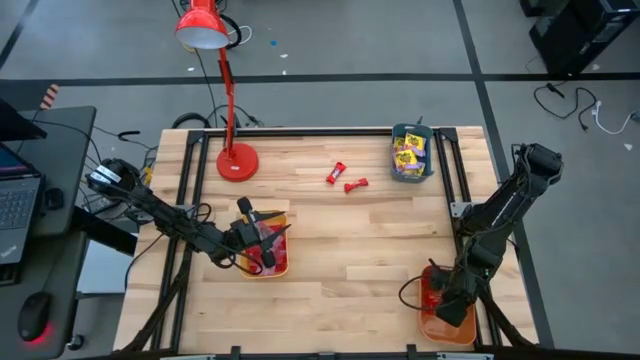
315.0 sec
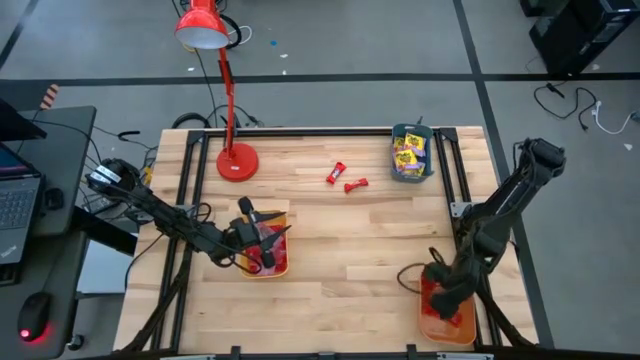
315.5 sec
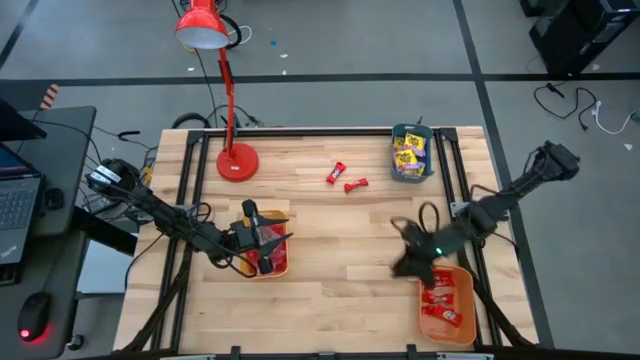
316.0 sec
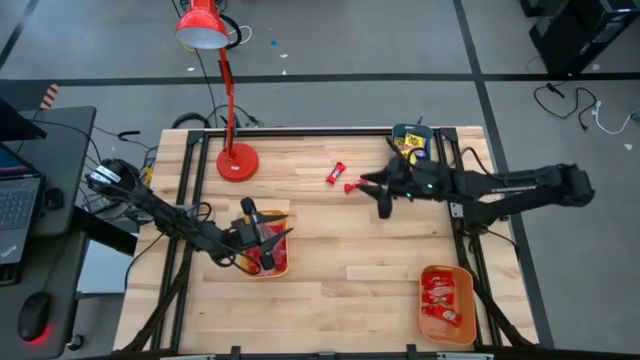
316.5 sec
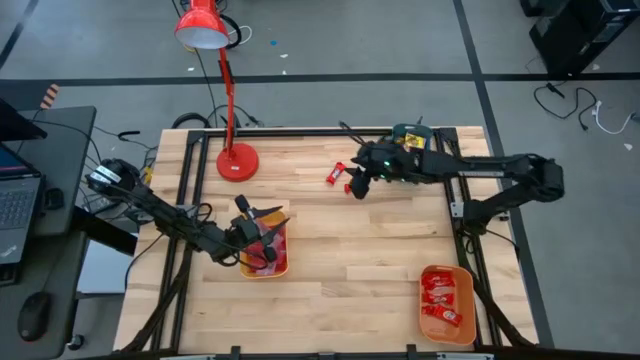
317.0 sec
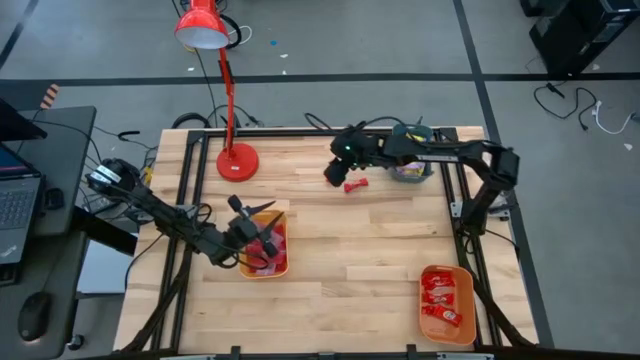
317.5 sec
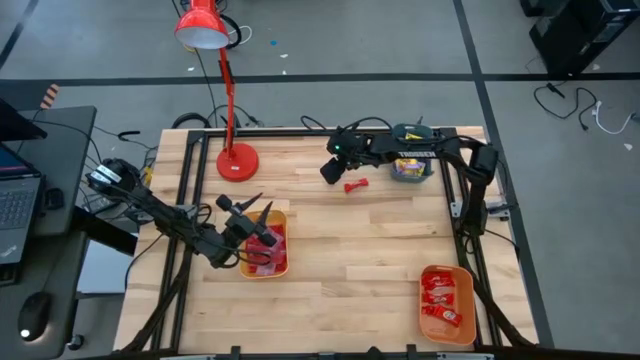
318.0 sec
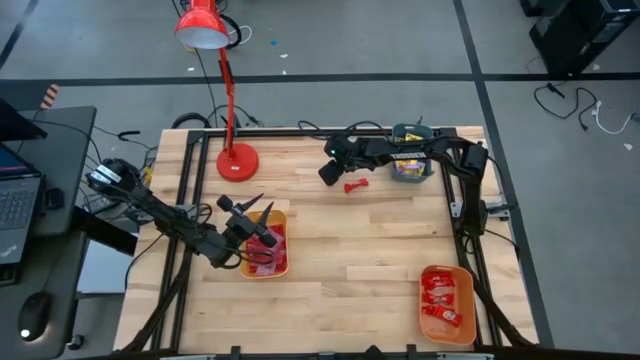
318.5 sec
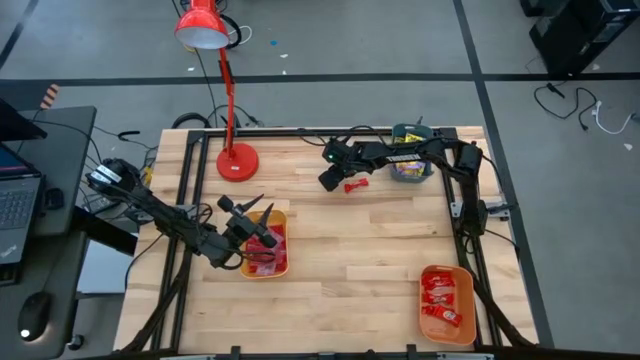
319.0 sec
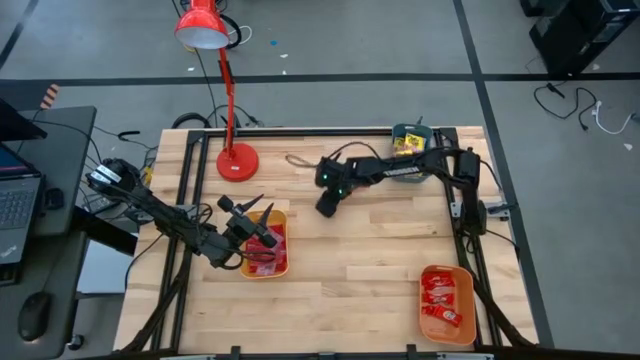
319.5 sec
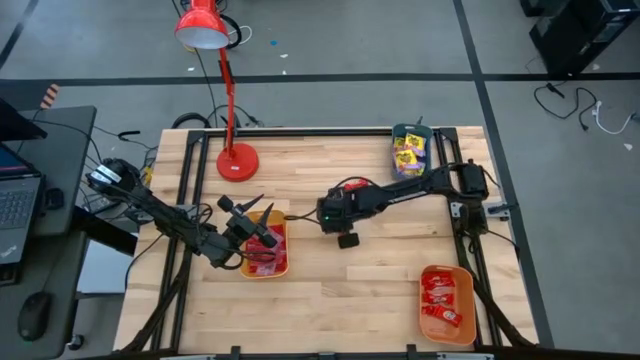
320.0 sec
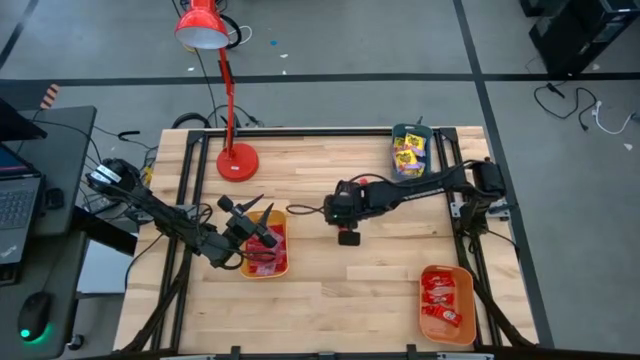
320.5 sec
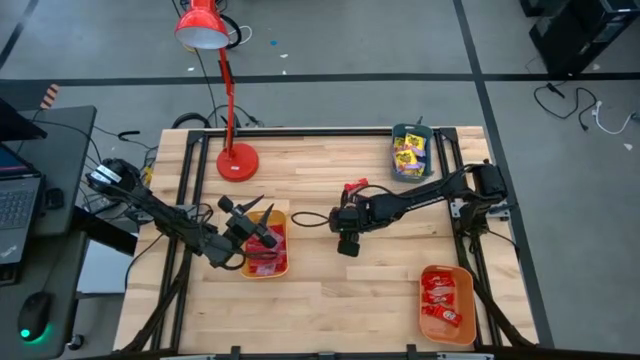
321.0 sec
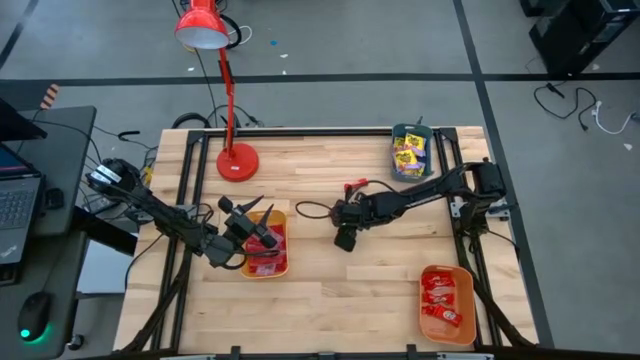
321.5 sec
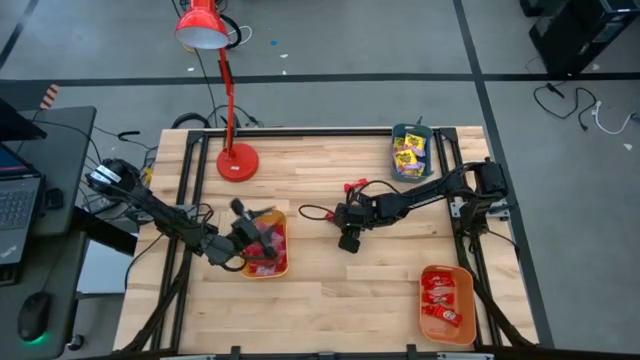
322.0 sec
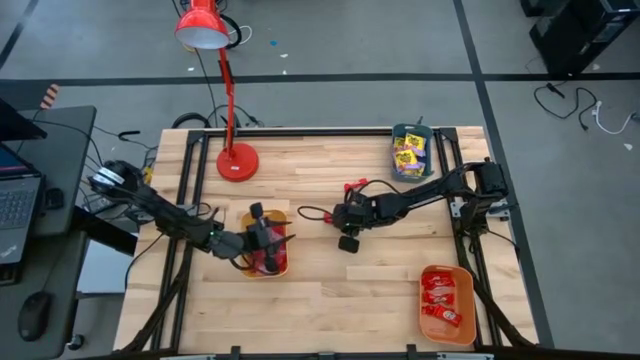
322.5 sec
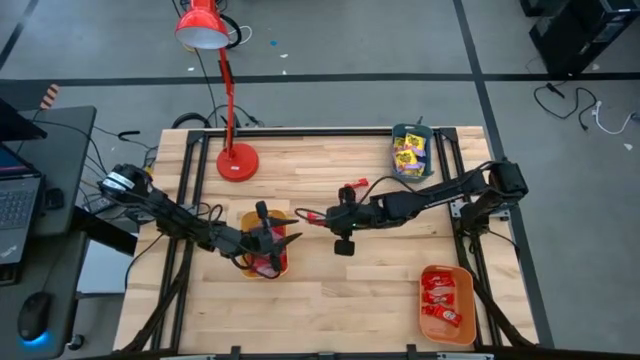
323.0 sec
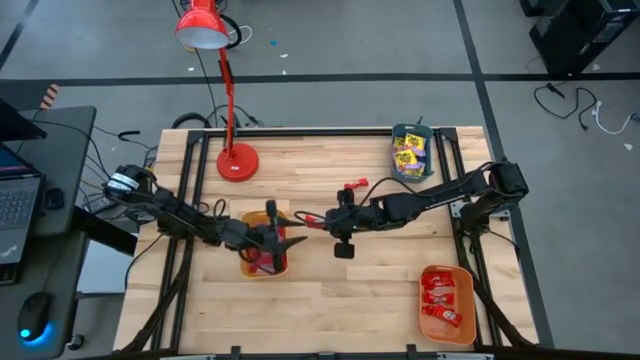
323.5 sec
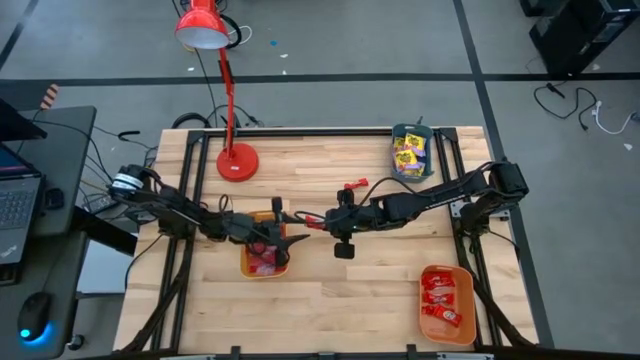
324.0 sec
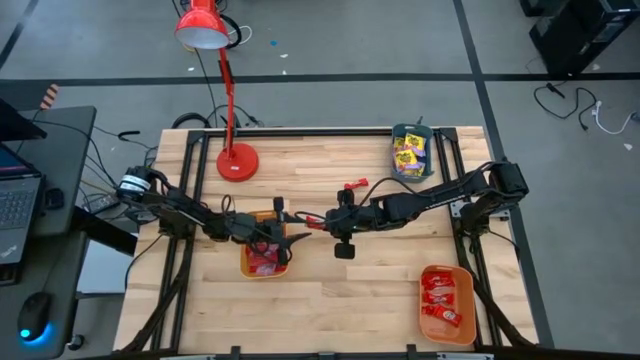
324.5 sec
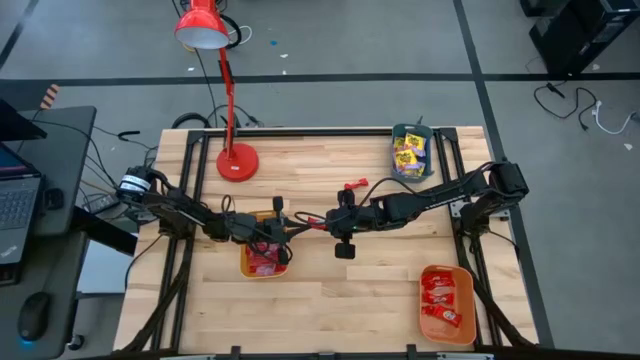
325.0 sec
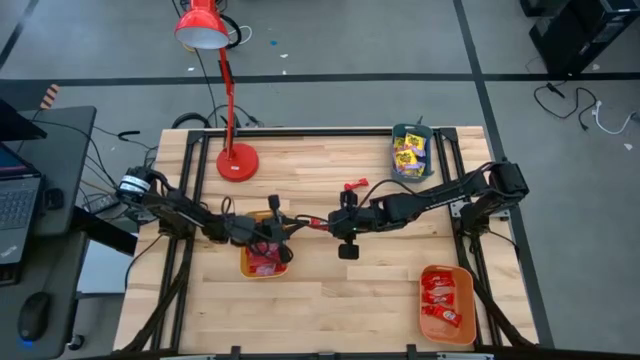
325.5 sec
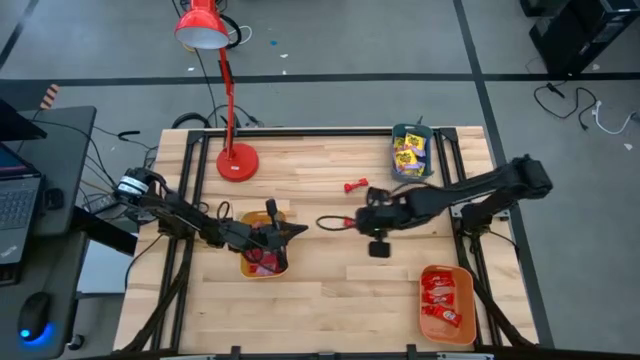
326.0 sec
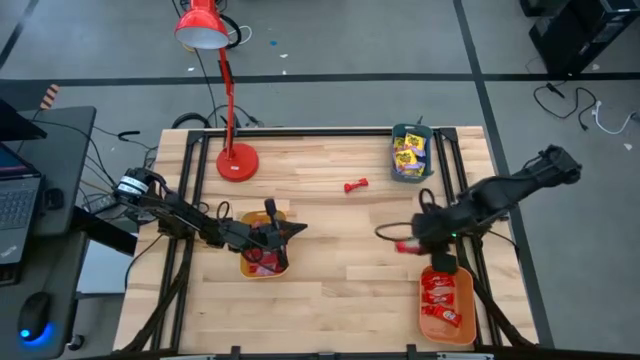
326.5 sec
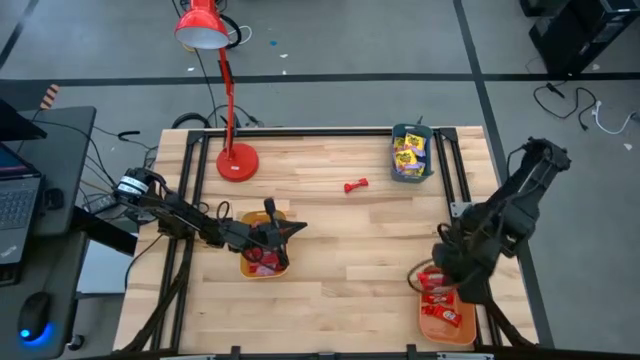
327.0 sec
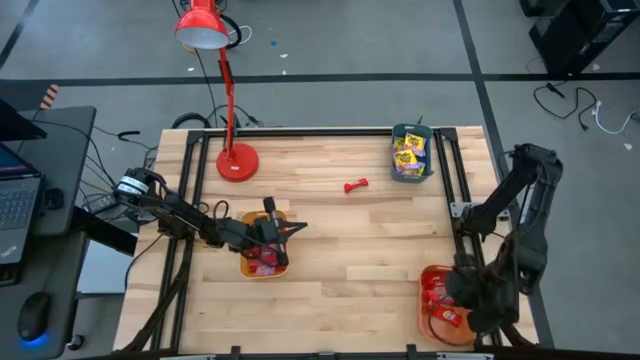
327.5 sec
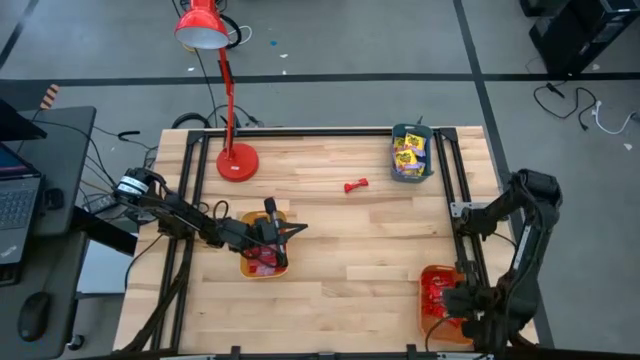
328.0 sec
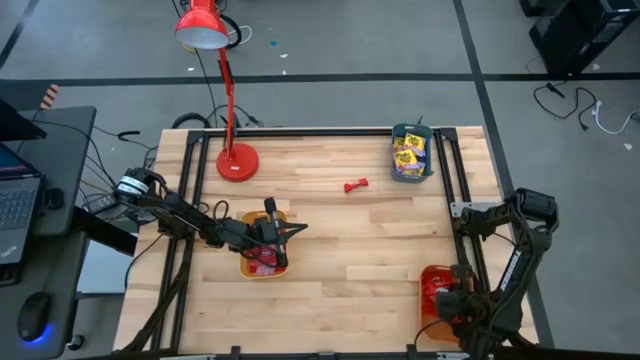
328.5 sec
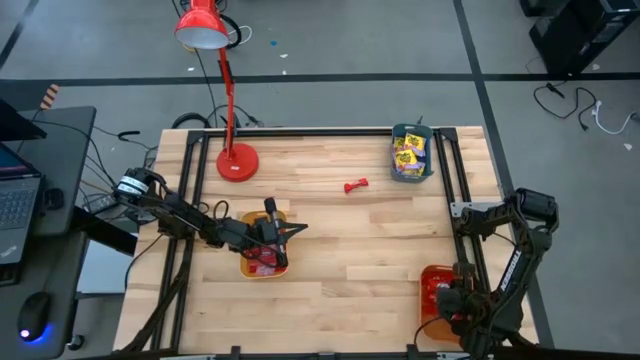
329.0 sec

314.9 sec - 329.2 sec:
Task: Sort candy
Put the red chocolate into the orange bin

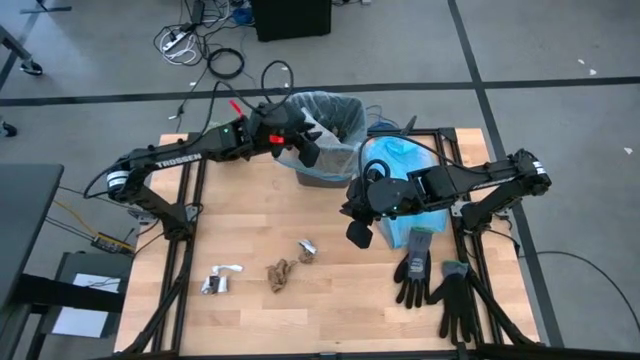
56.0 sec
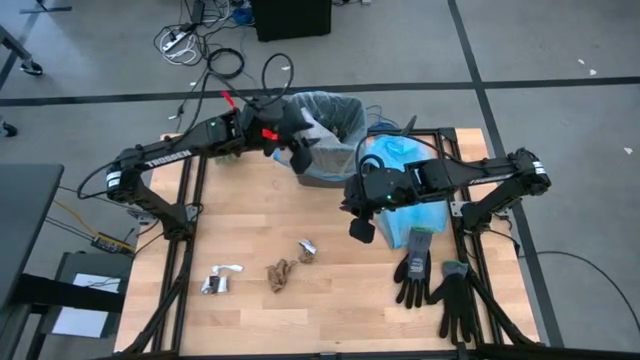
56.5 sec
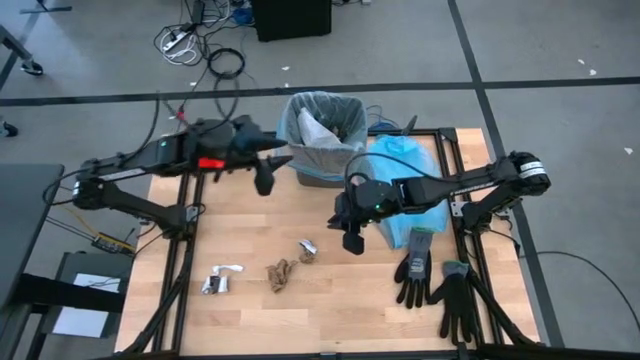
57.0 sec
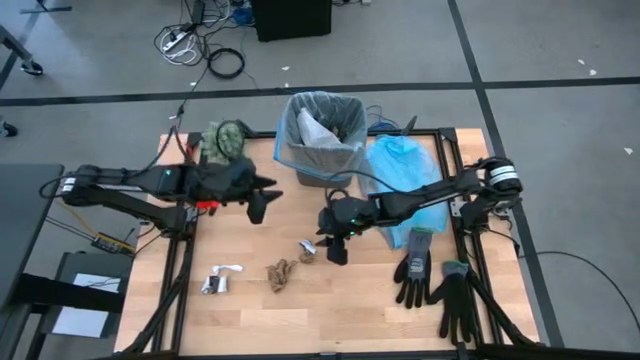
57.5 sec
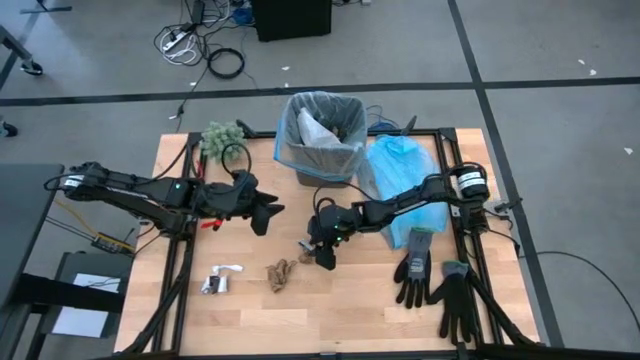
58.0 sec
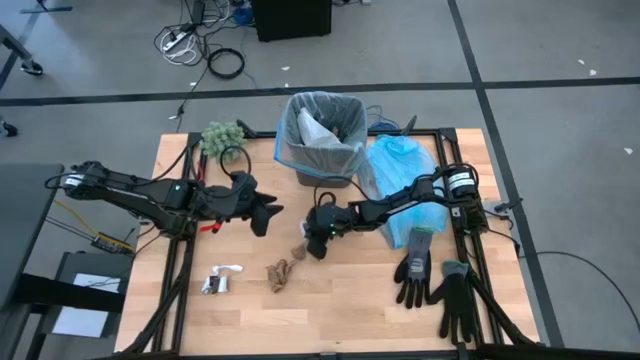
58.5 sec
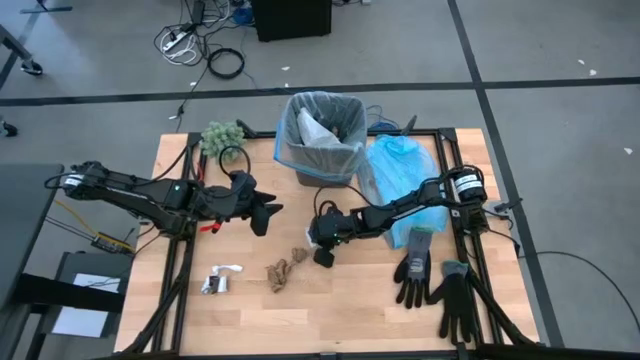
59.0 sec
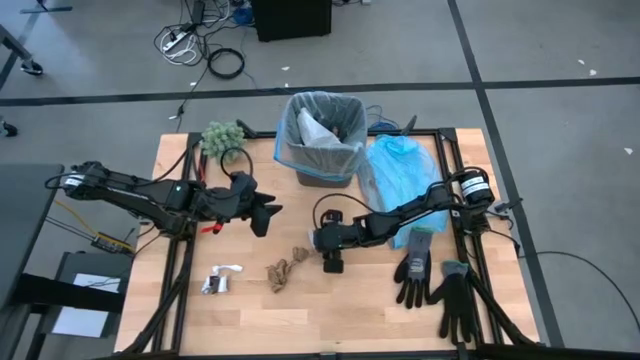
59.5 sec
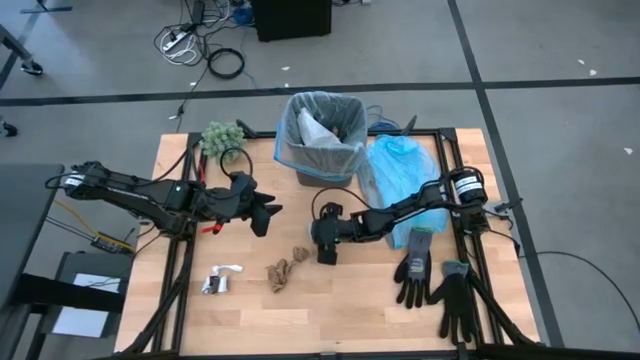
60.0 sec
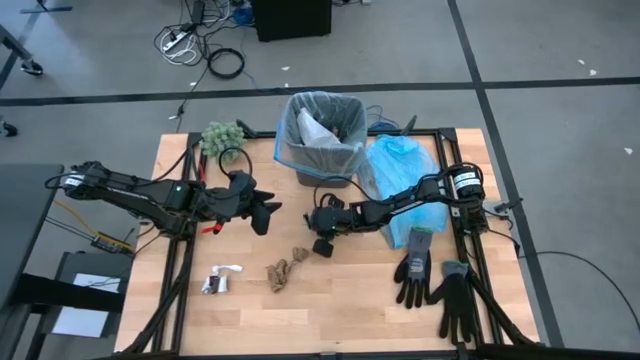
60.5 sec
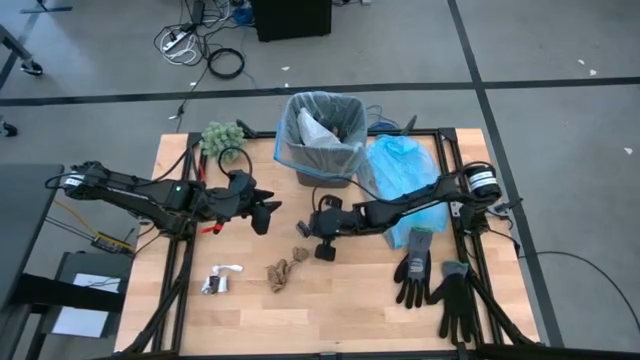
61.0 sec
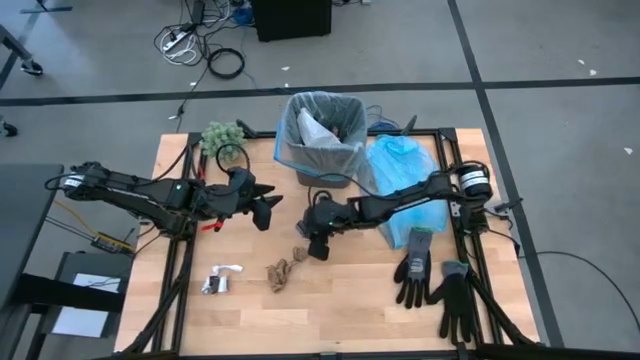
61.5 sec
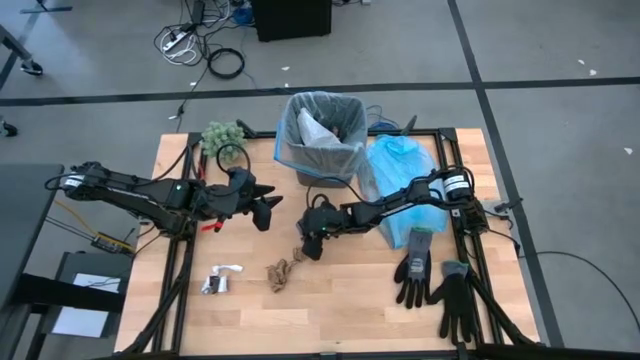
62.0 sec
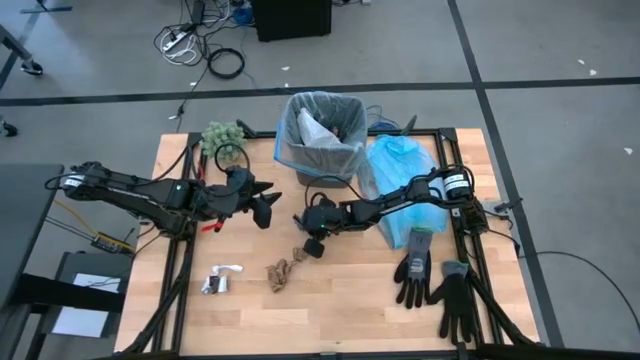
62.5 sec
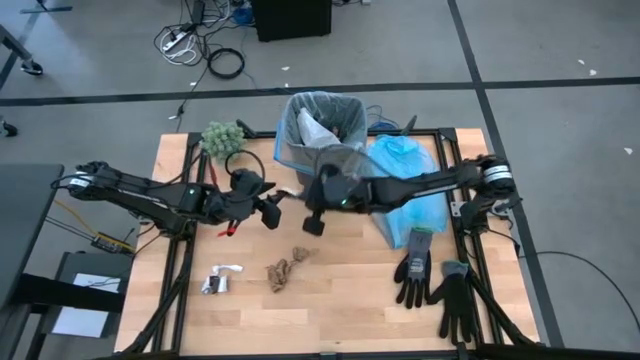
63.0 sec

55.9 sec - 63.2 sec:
Task: place trash/remove bag and relplace
Put the white paper into the trash bin
